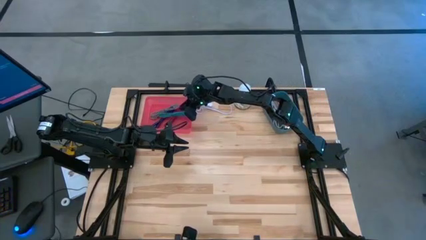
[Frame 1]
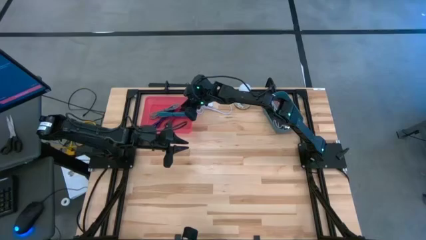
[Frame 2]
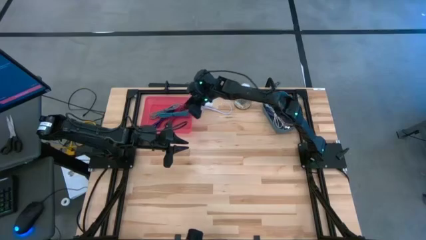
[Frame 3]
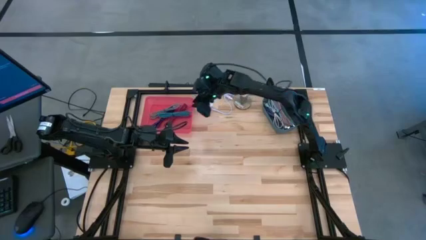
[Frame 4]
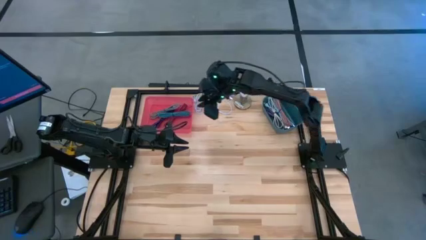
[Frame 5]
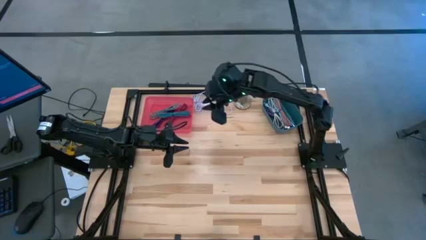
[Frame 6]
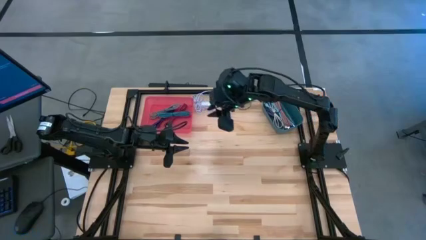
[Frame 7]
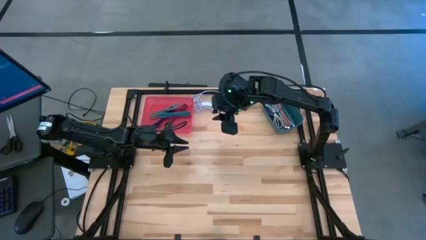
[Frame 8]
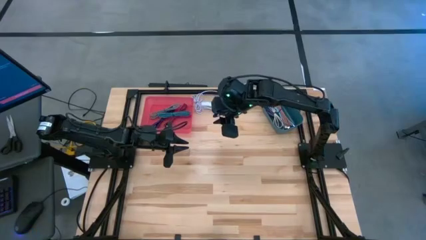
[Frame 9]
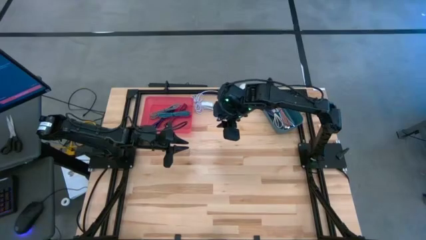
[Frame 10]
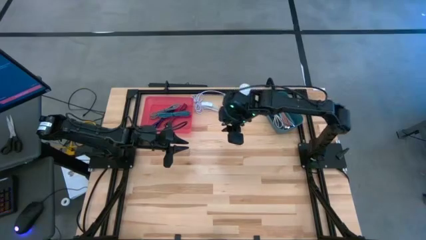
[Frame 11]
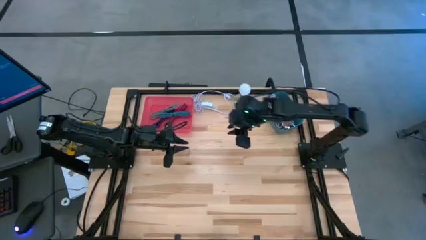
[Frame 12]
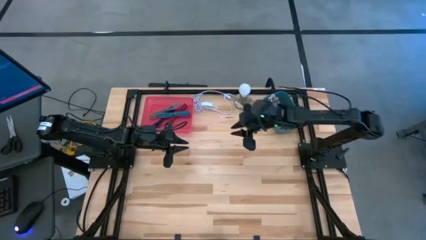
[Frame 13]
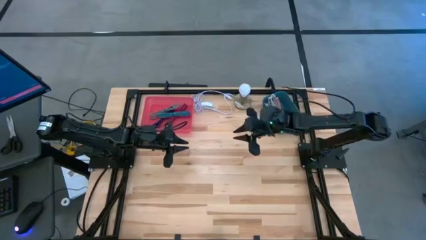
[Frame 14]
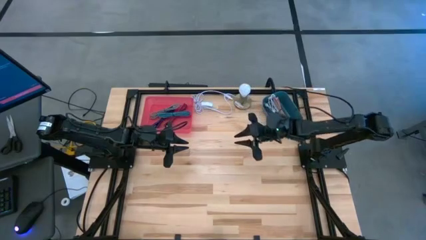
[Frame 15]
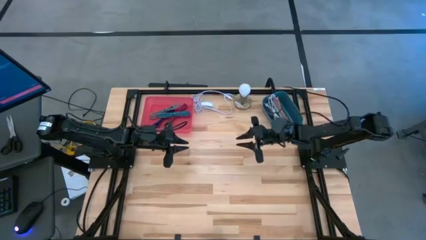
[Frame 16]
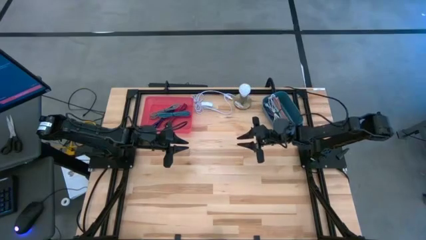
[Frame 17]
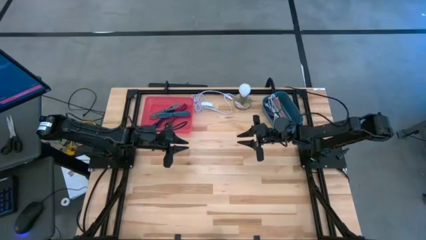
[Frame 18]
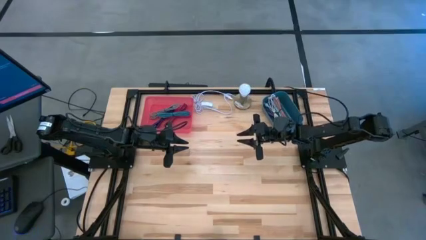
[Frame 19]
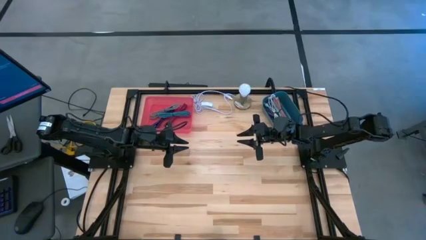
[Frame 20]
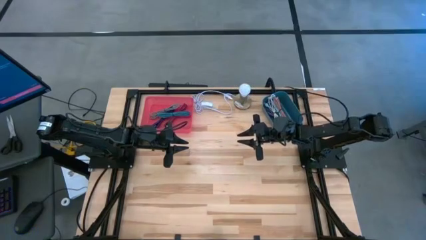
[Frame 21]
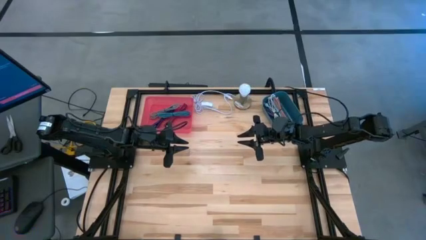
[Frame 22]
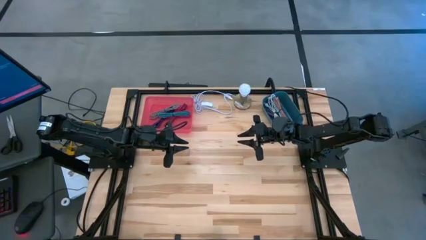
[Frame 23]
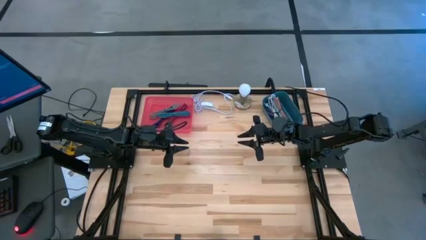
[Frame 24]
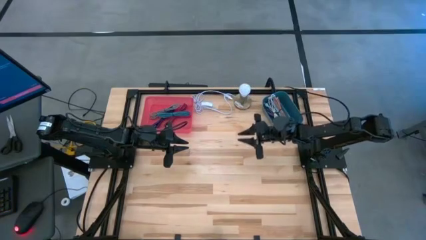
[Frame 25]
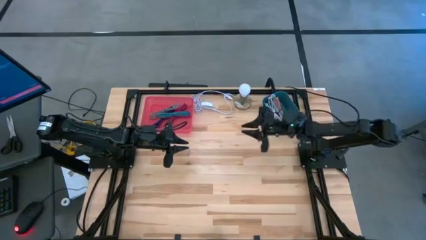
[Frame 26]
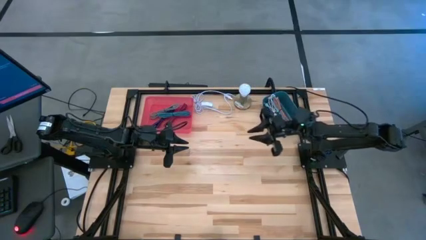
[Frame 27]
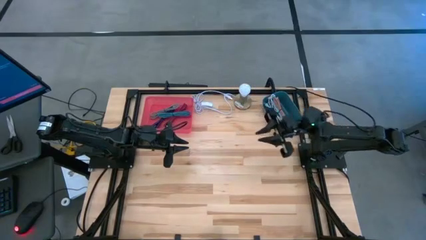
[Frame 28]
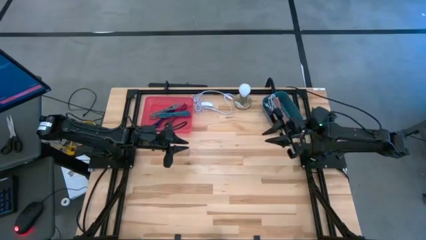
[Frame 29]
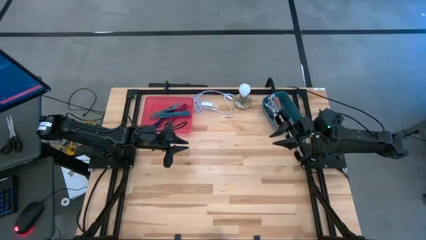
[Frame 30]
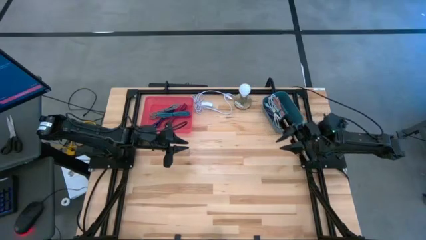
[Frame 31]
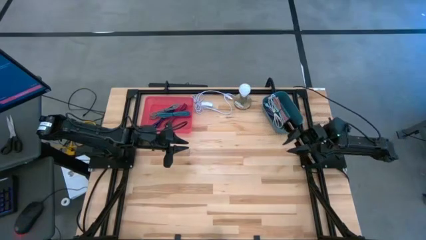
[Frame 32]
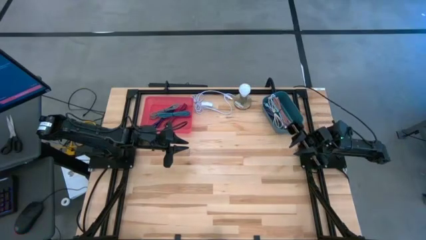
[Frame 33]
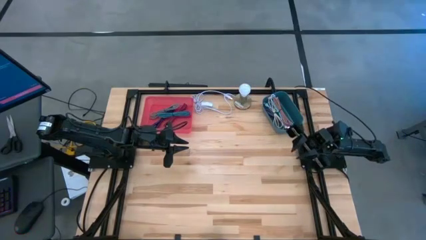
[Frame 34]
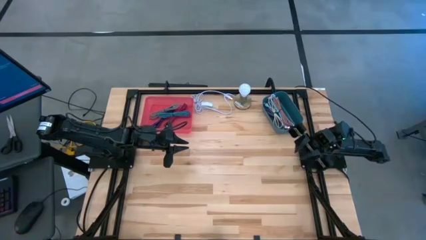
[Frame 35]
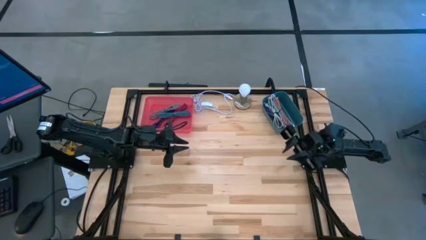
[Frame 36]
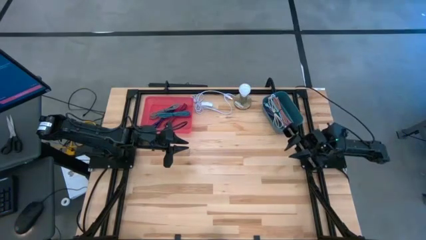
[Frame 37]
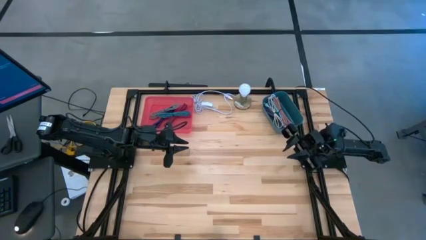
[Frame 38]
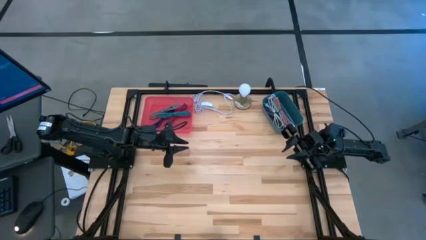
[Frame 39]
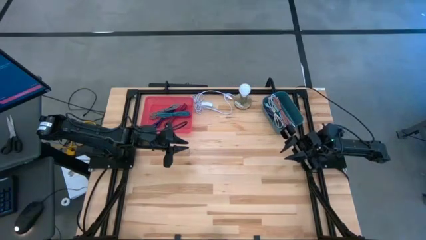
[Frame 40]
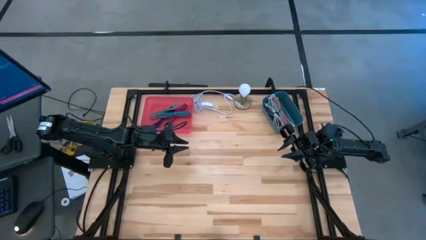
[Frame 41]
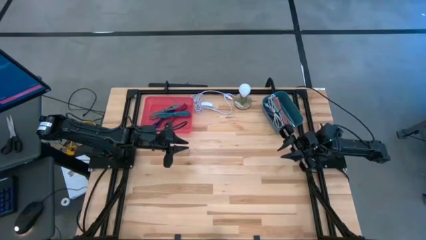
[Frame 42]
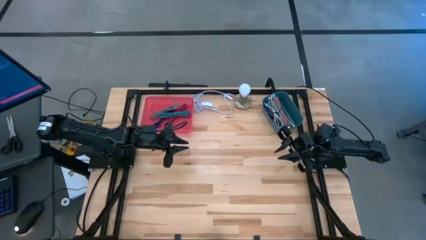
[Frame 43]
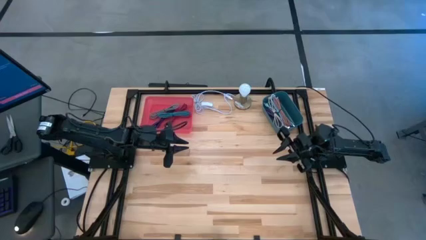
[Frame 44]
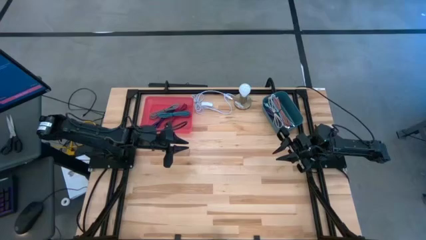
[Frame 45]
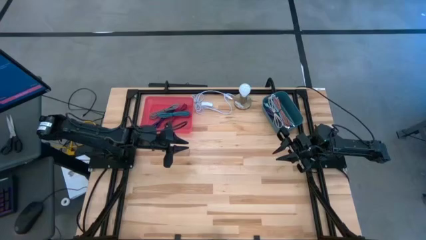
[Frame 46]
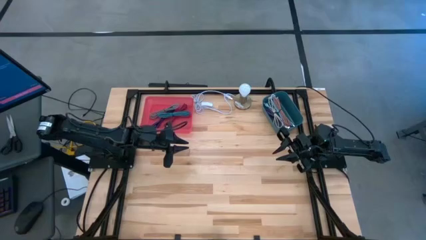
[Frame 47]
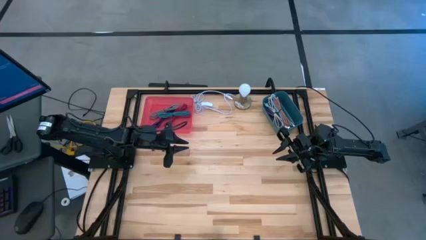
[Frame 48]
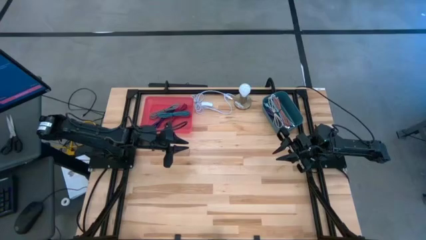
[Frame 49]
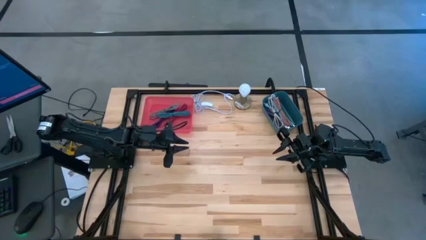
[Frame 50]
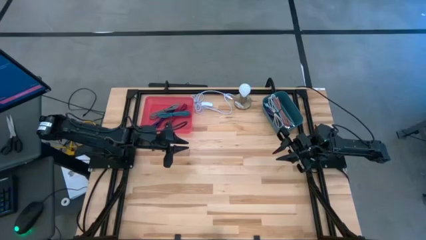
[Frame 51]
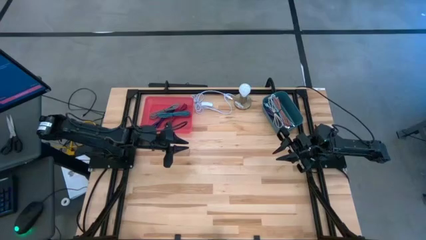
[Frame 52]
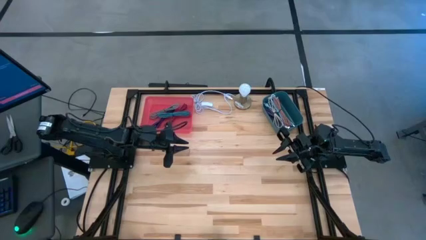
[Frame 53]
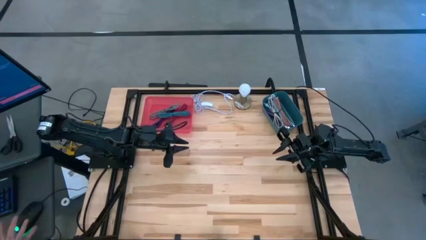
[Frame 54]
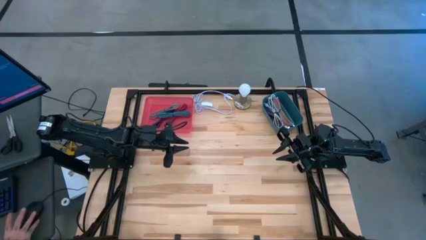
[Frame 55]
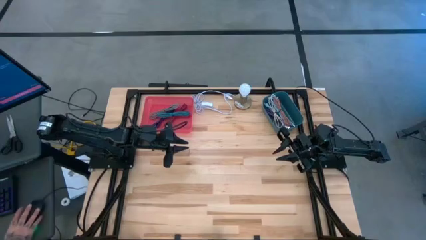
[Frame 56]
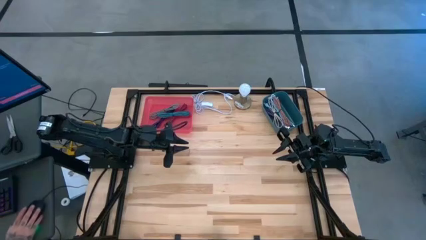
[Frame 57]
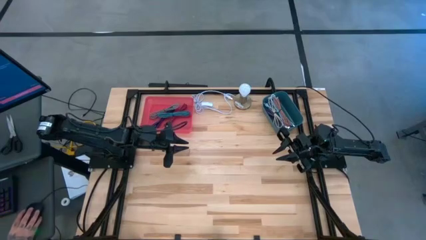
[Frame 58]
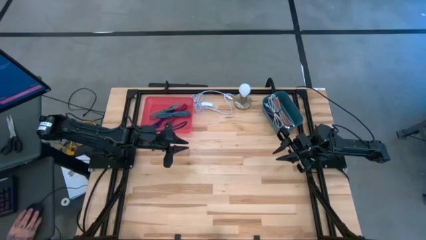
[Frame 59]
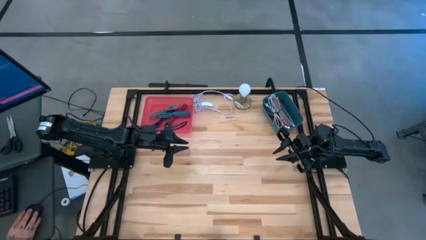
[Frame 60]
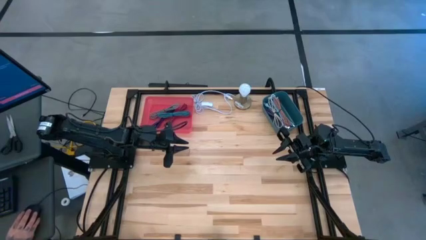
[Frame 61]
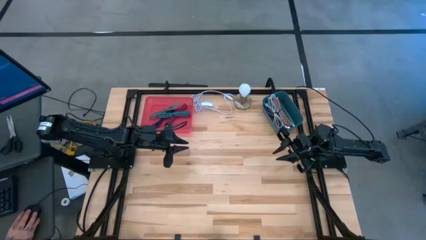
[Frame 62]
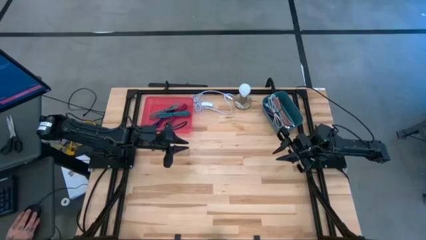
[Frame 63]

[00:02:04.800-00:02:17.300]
Task: Pick & Place USB Port
Return to Home Position

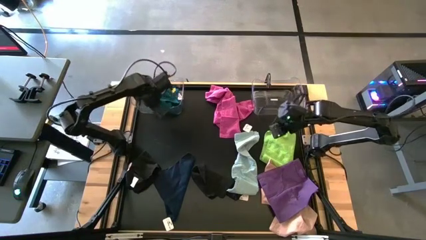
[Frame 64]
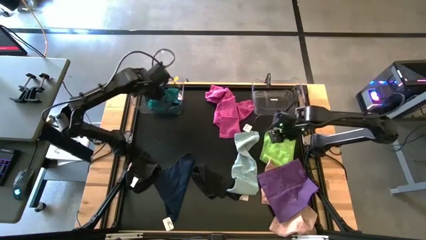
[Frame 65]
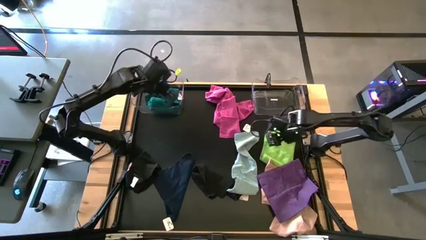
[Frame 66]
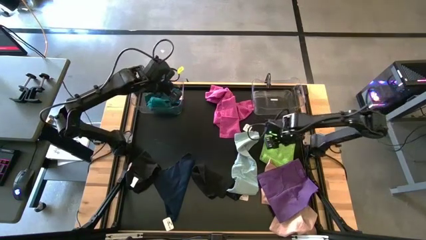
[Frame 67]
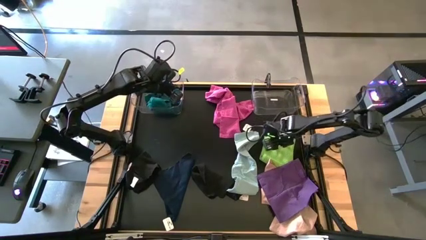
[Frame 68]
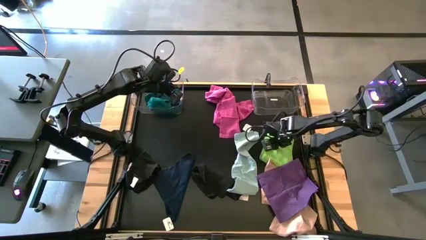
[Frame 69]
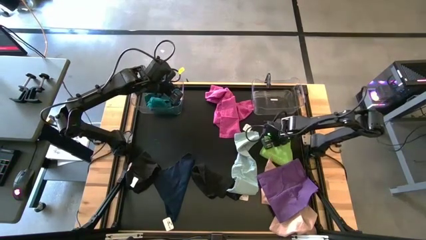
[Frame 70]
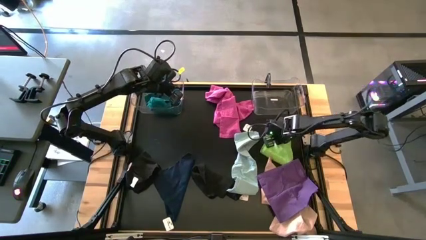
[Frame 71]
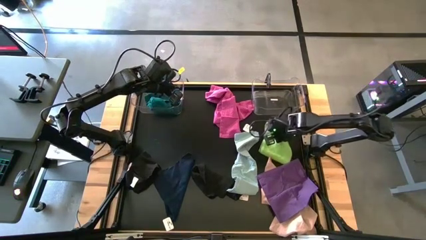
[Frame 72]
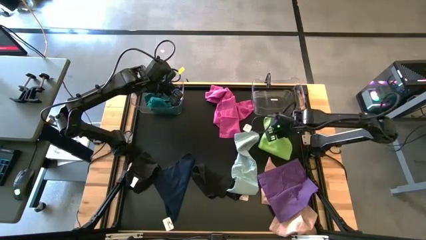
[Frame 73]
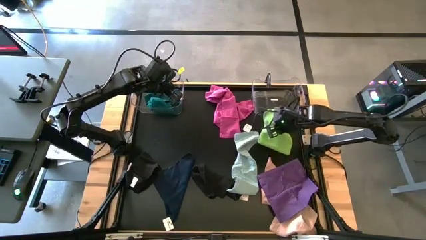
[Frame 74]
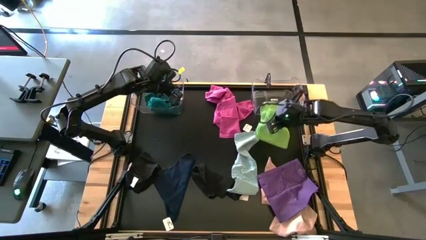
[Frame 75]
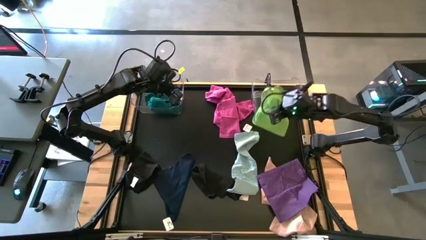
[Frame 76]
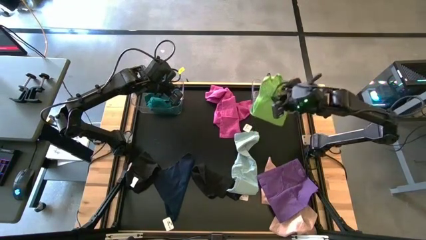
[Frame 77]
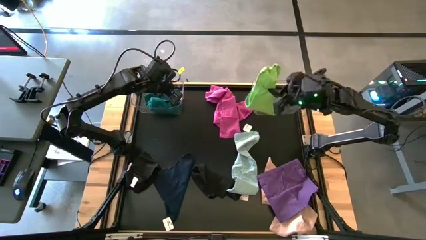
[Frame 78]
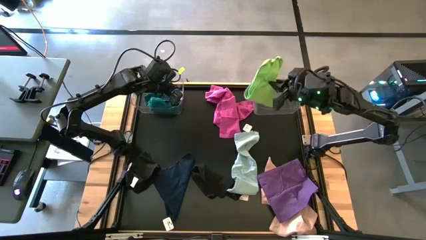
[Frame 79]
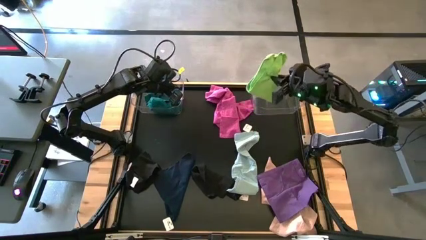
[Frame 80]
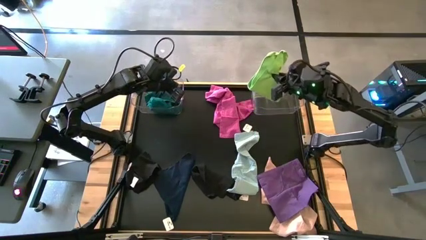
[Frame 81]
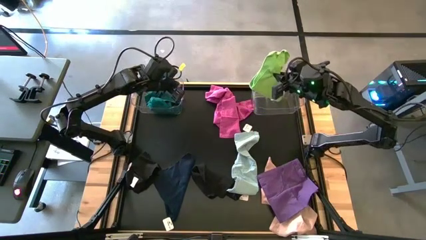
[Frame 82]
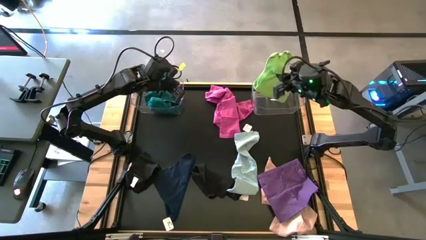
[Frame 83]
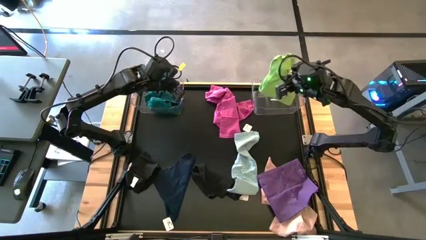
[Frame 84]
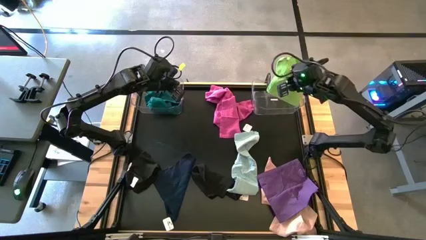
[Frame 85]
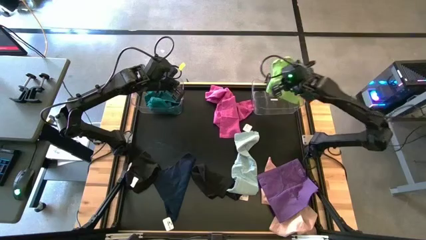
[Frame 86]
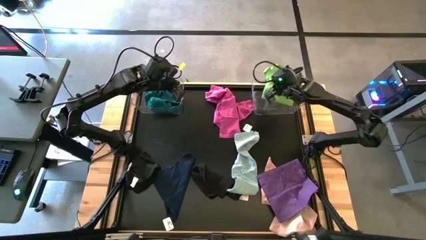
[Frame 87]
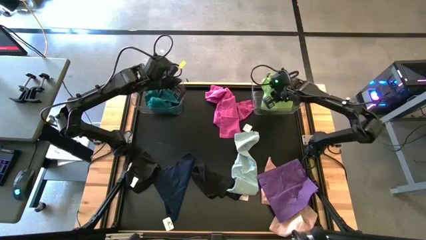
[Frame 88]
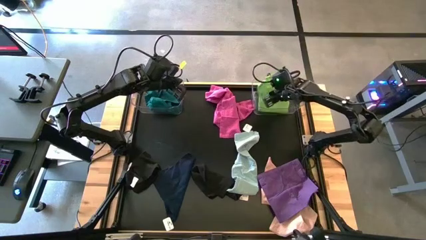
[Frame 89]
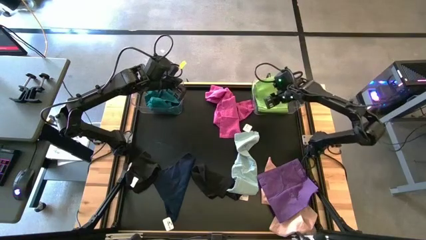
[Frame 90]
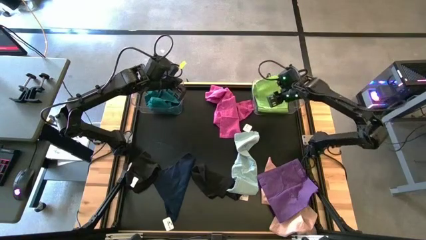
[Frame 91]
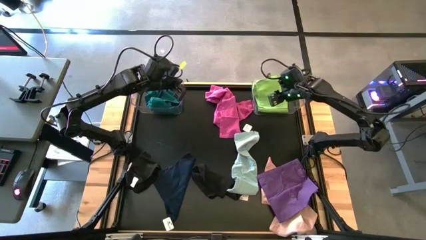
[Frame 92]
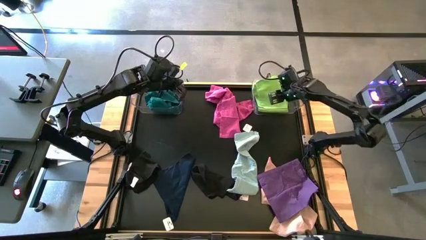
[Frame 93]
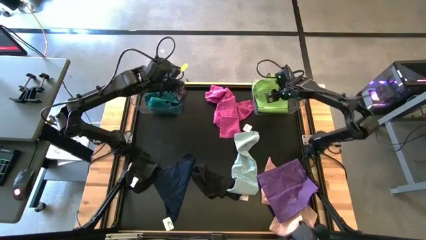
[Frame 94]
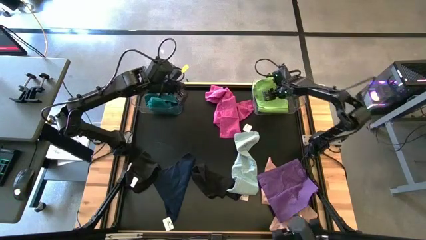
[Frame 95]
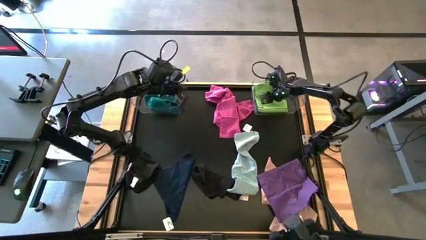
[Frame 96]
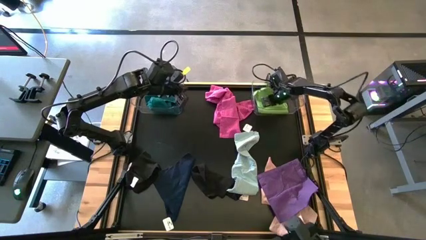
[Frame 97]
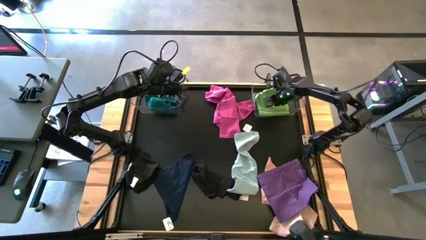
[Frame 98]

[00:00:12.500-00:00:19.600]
Task: Sort towels by color in basket
Put the green microfiber towel into the right transparent bin
